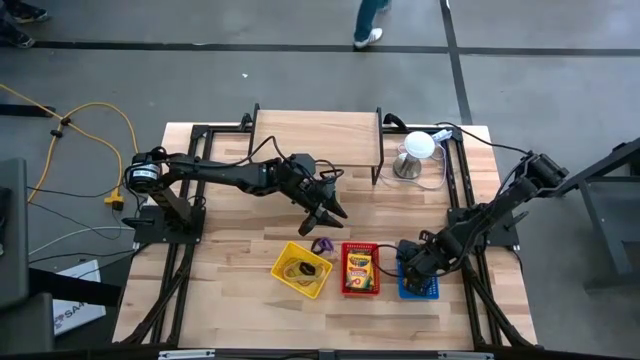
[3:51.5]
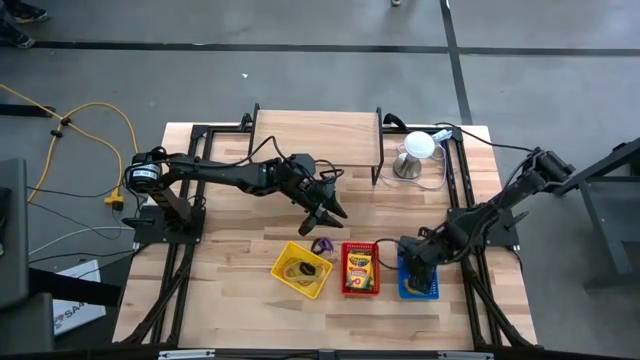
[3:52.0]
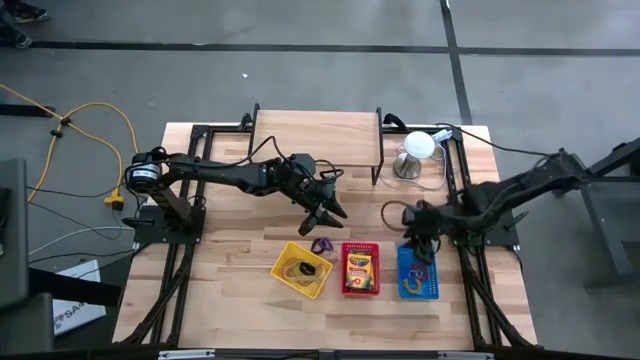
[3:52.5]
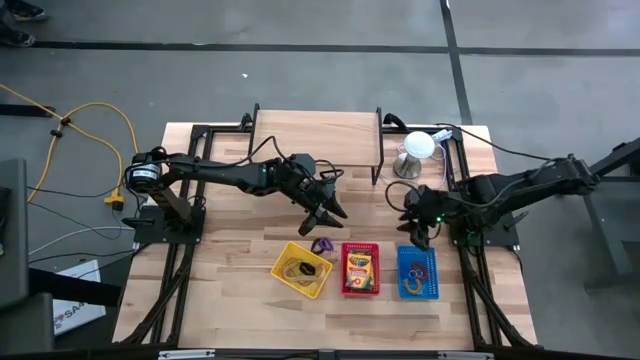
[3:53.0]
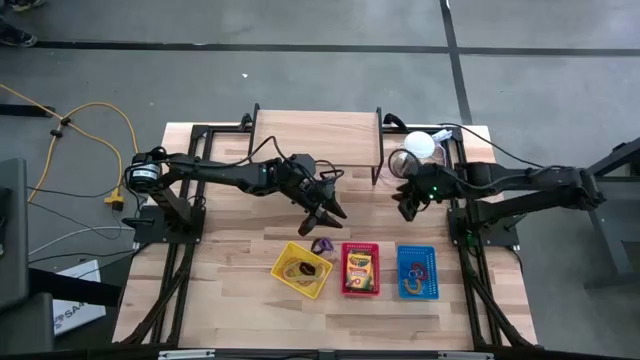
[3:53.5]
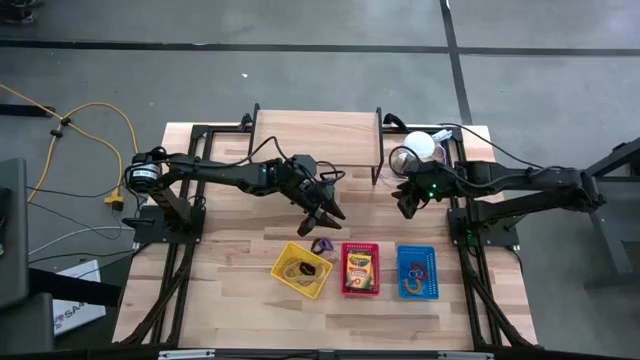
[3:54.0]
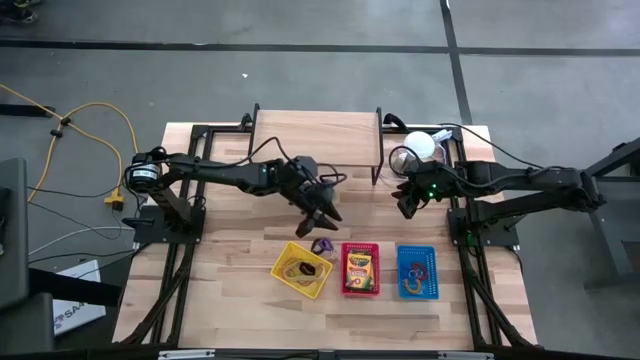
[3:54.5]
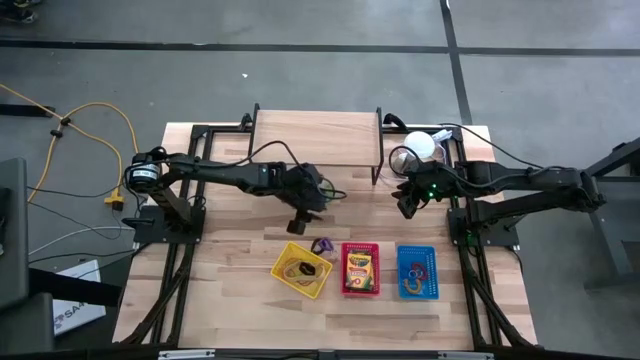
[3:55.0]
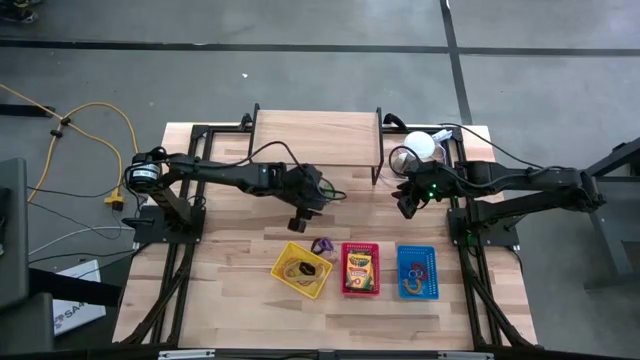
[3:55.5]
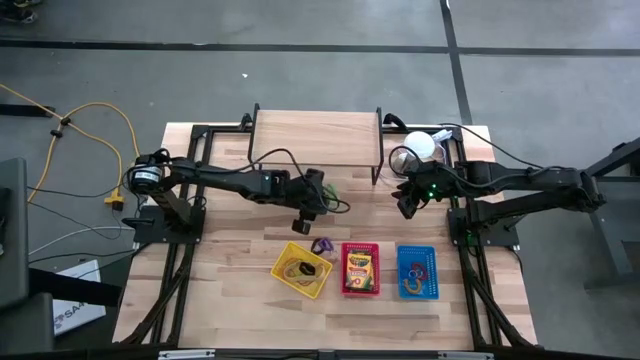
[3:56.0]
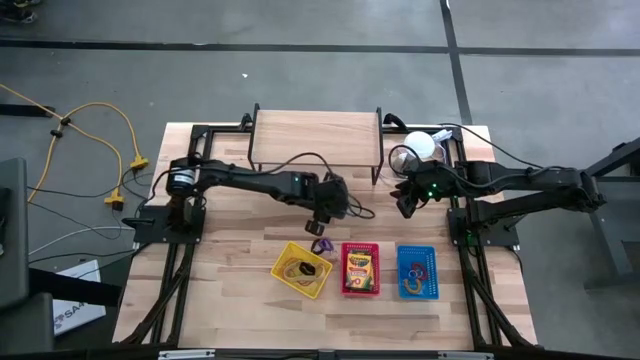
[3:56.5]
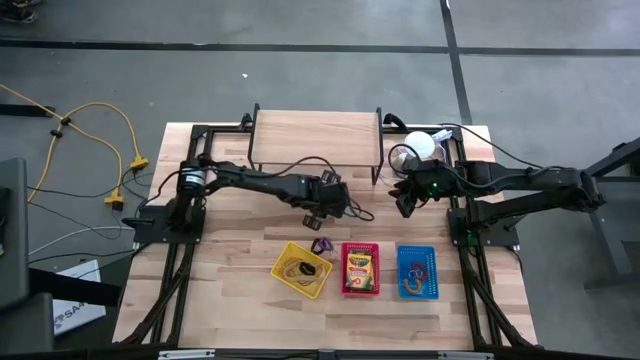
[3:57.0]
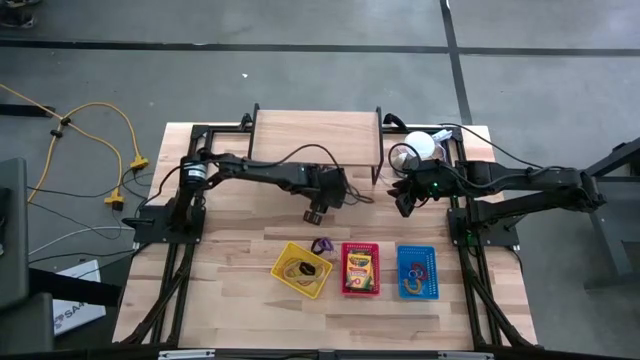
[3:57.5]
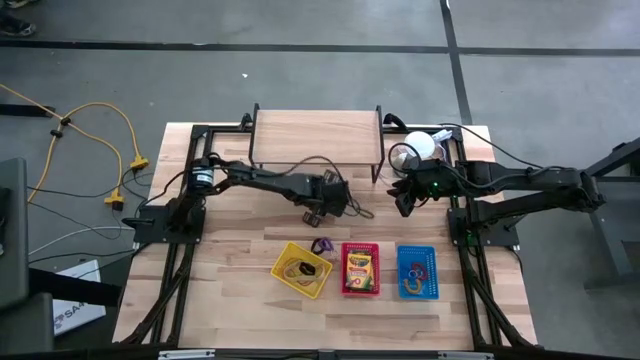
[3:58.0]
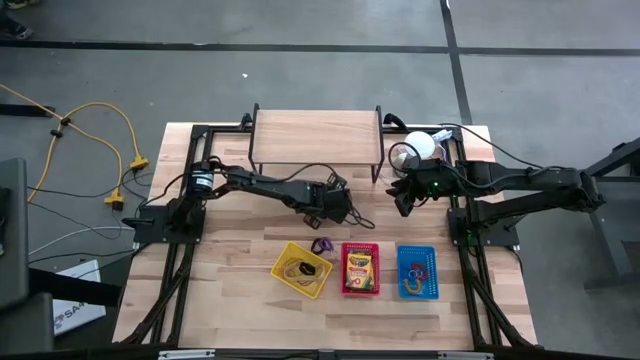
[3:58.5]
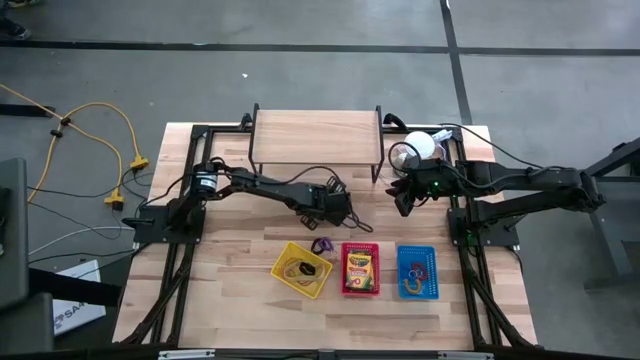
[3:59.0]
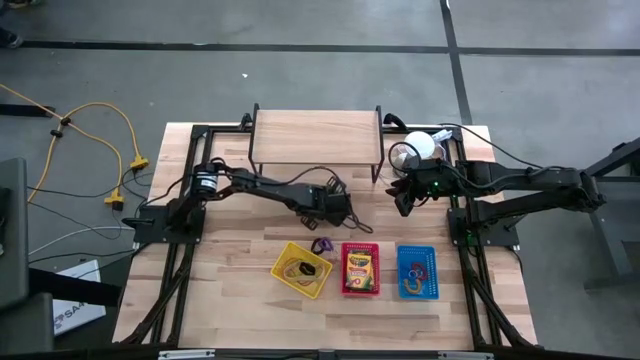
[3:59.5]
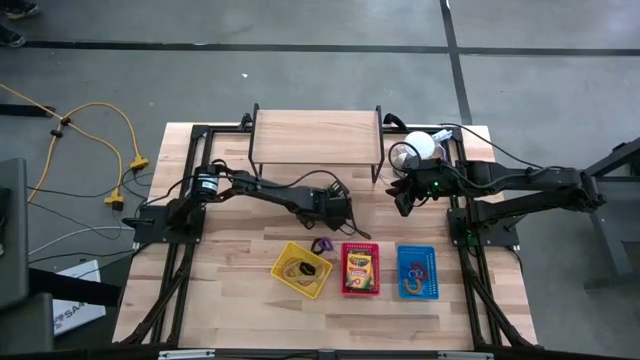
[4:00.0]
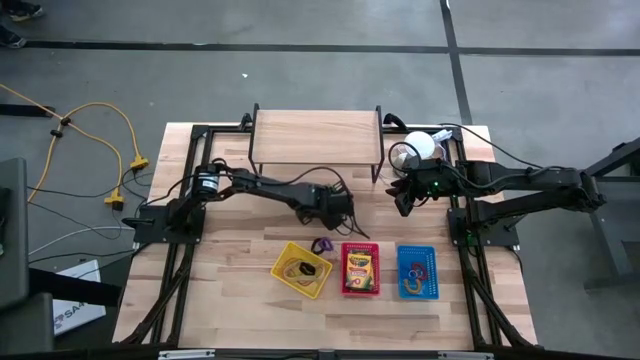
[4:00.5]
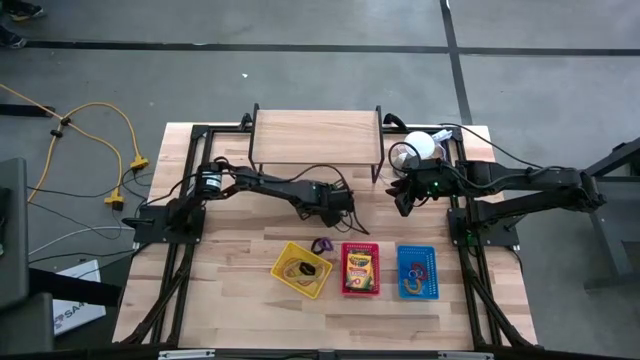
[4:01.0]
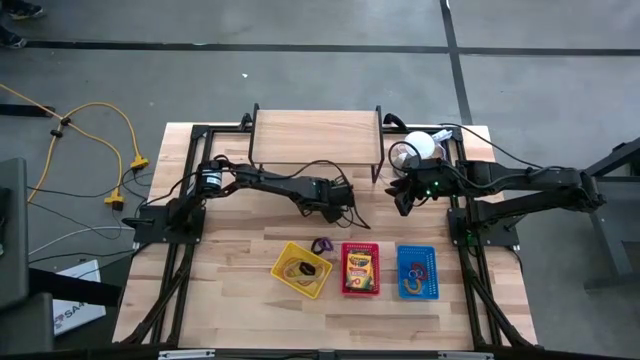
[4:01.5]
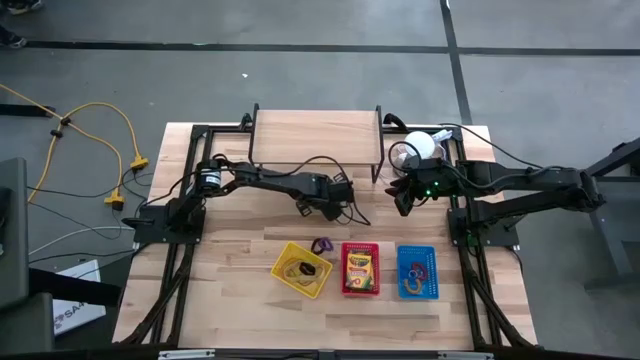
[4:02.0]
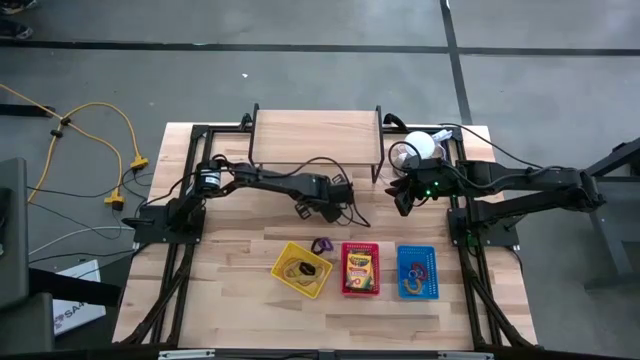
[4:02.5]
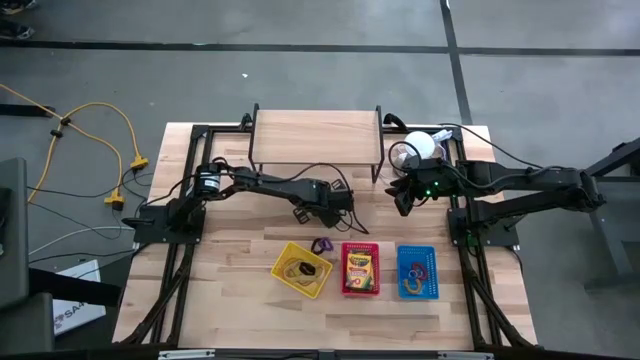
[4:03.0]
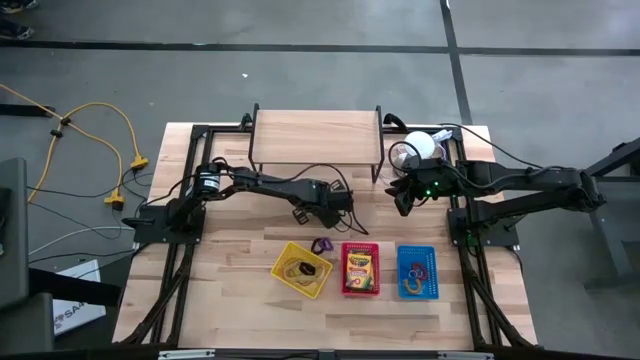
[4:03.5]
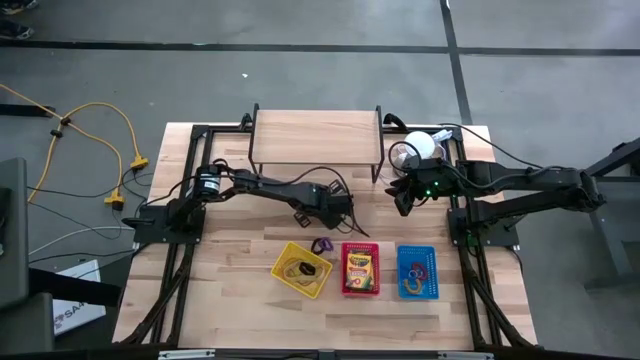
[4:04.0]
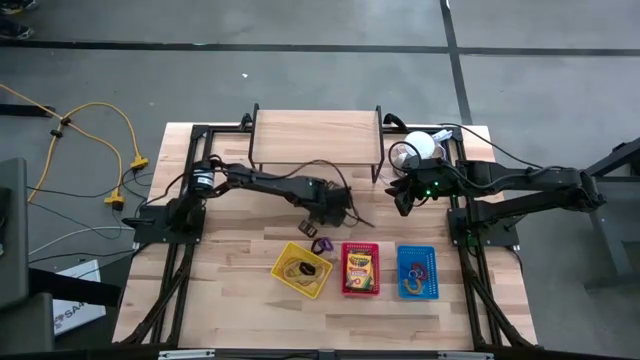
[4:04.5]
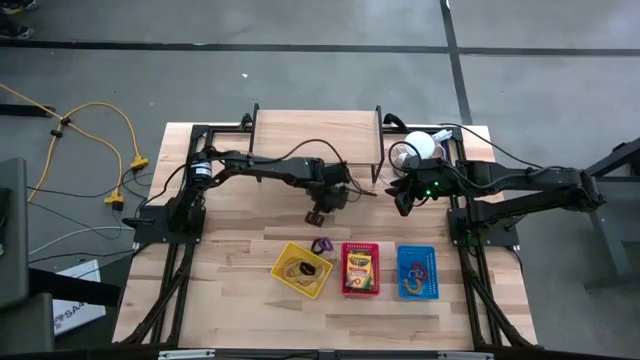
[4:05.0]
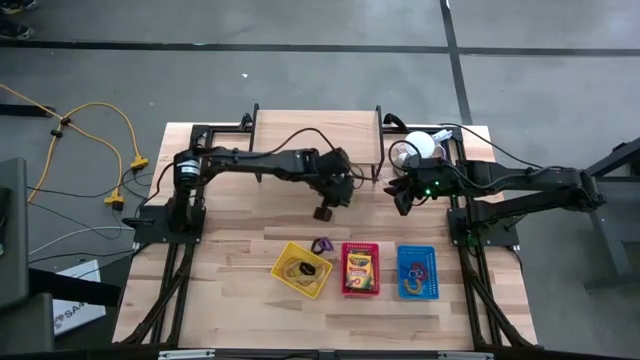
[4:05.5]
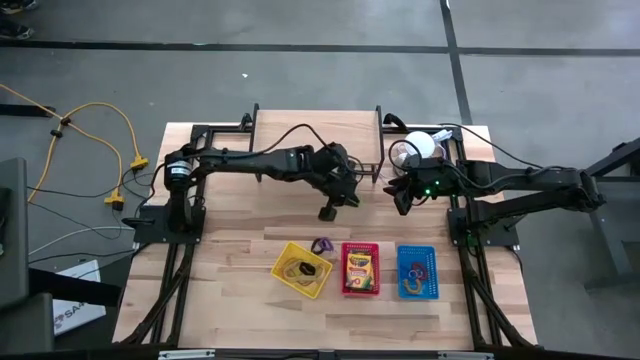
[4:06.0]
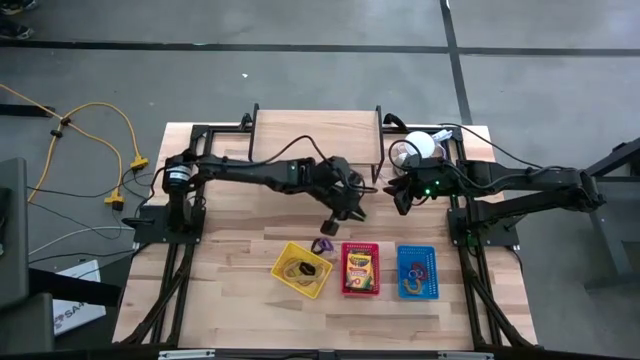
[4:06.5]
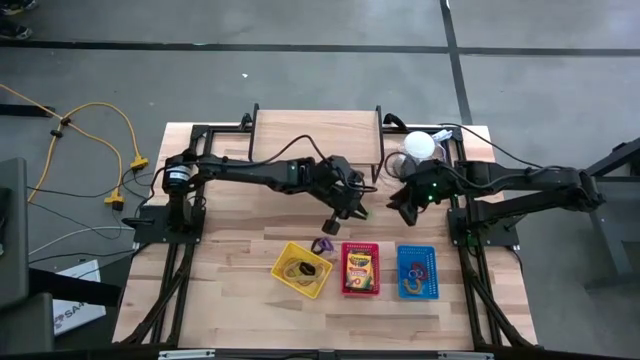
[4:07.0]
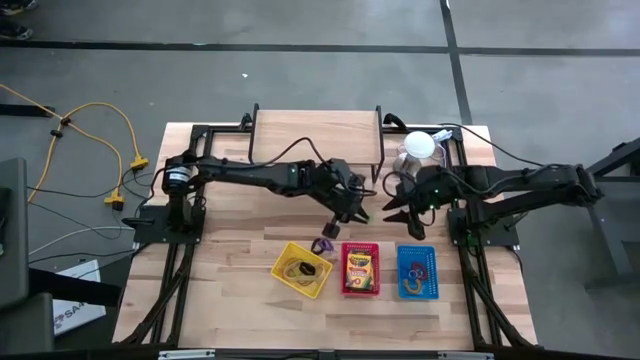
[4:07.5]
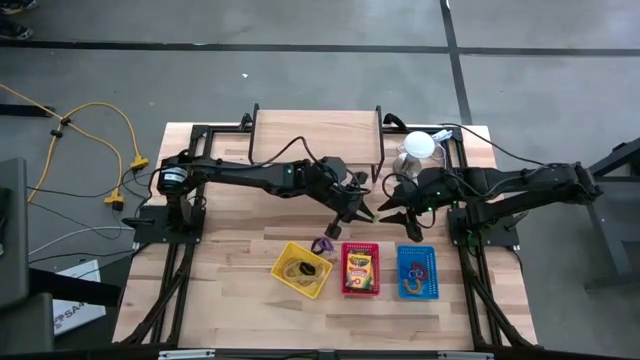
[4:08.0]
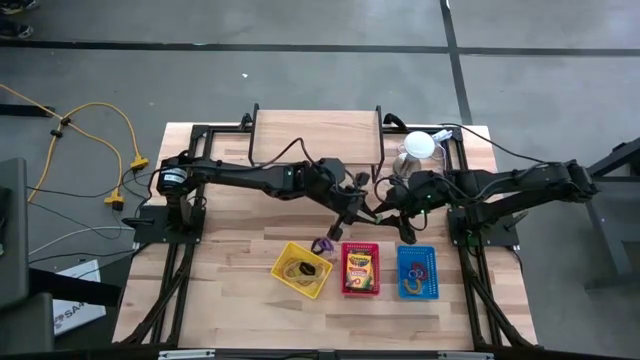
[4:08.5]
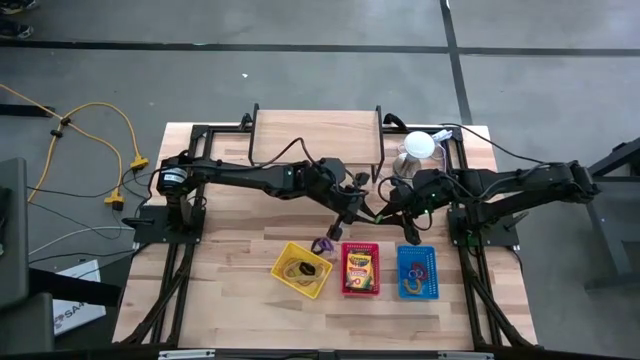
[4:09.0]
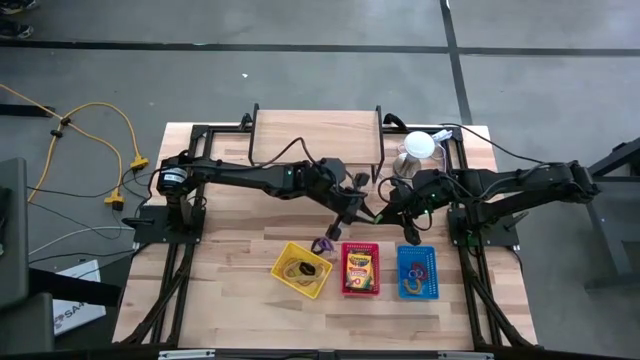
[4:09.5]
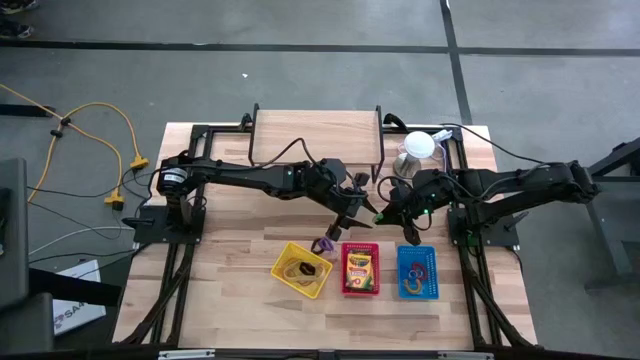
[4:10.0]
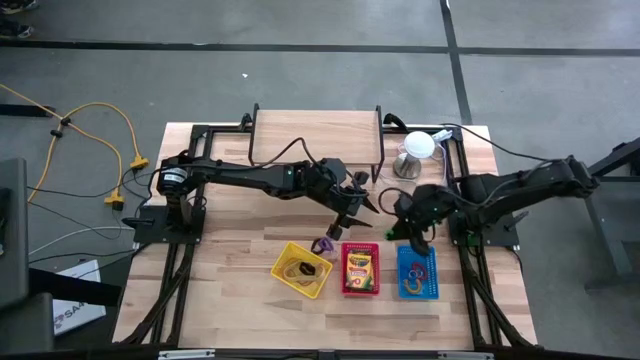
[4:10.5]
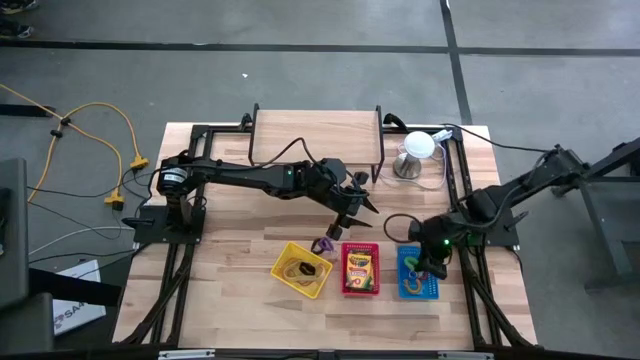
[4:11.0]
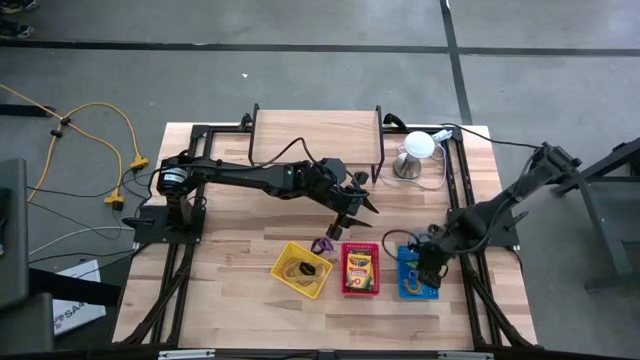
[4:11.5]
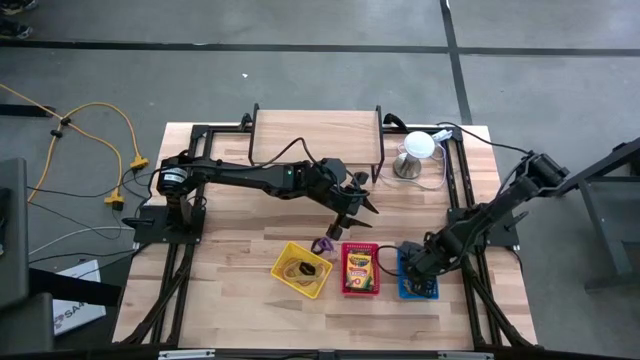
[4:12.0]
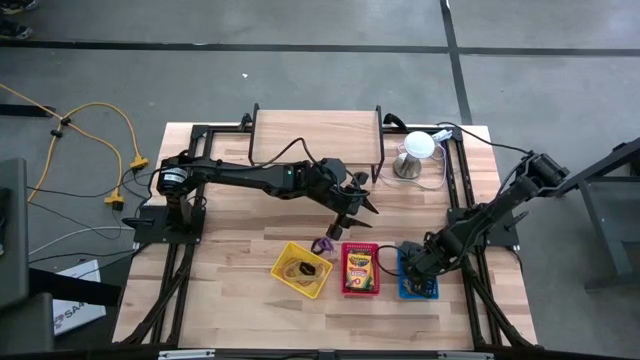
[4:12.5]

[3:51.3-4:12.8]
Task: Pick & Place Office Desk Supplies
Put the green spring keychain into the blue bin
